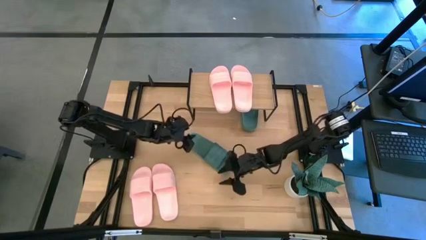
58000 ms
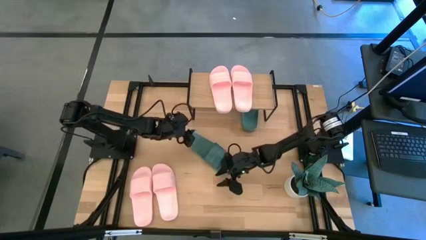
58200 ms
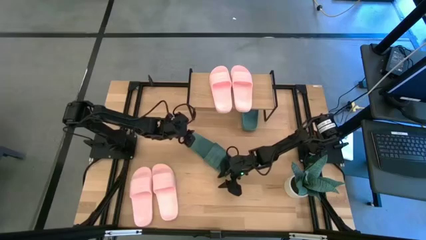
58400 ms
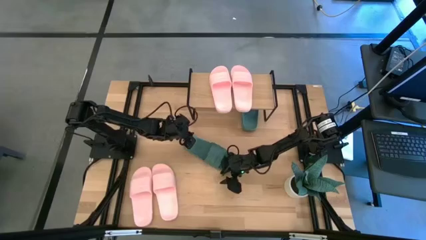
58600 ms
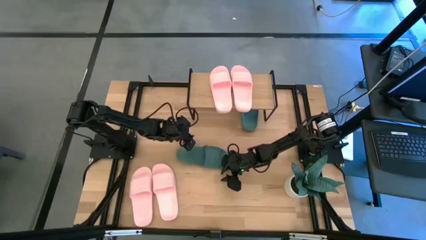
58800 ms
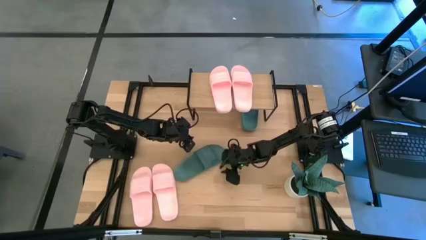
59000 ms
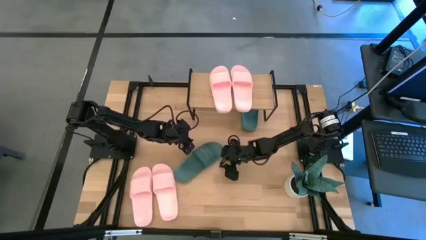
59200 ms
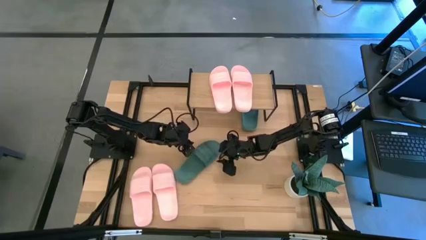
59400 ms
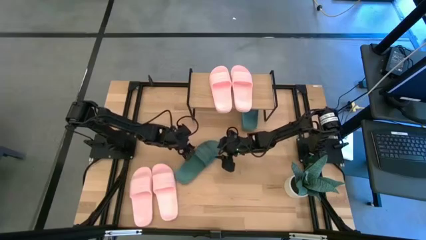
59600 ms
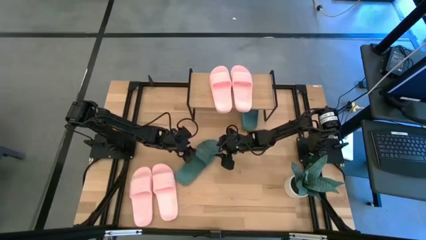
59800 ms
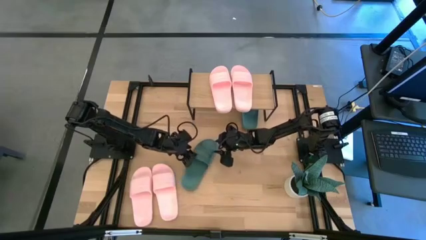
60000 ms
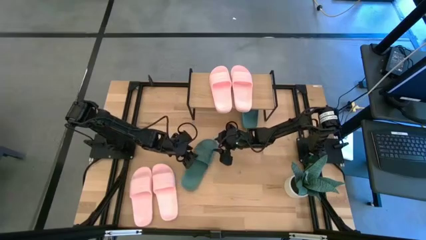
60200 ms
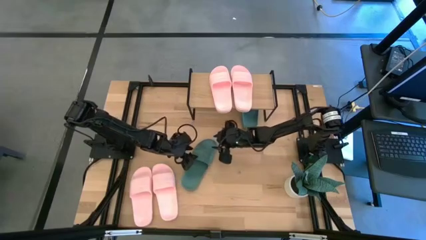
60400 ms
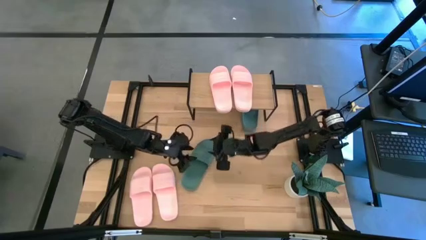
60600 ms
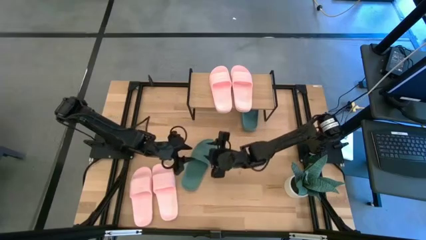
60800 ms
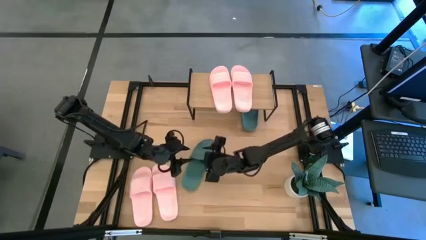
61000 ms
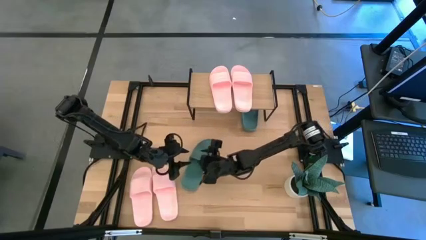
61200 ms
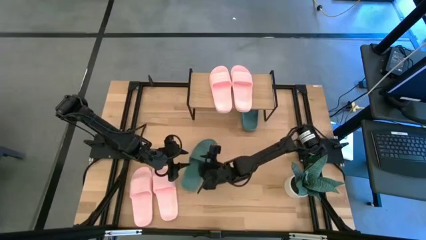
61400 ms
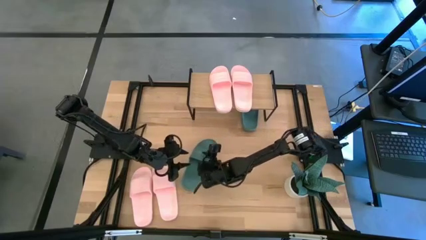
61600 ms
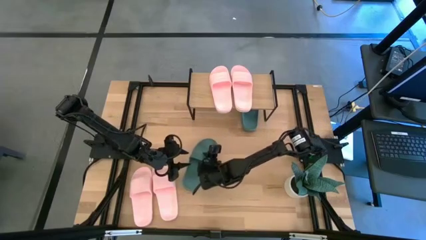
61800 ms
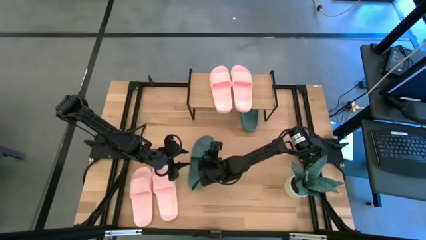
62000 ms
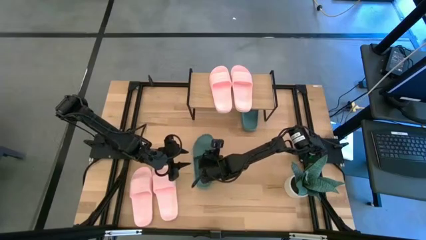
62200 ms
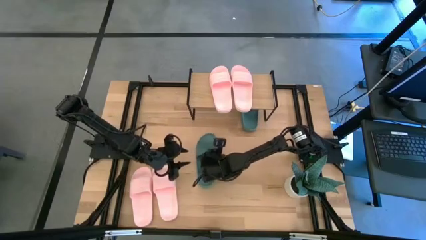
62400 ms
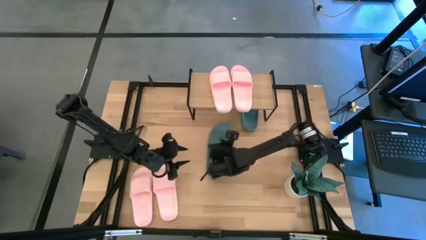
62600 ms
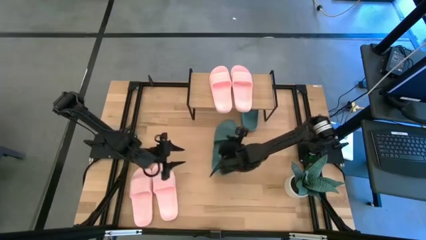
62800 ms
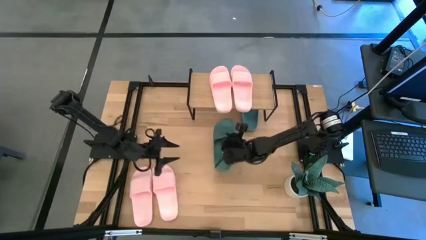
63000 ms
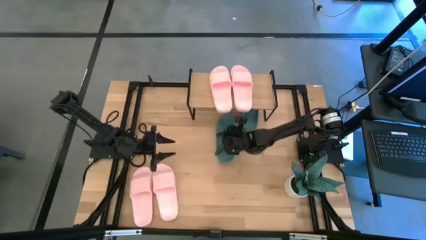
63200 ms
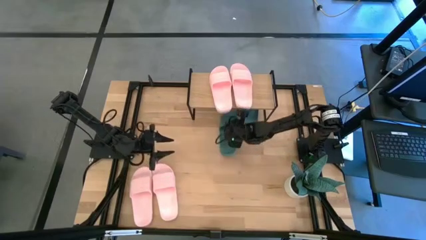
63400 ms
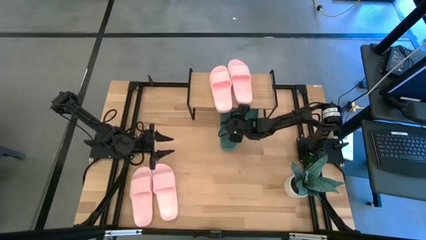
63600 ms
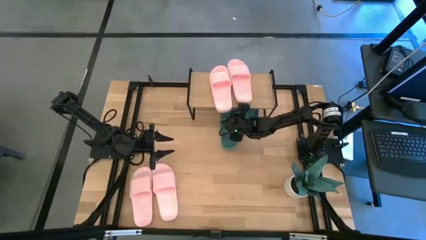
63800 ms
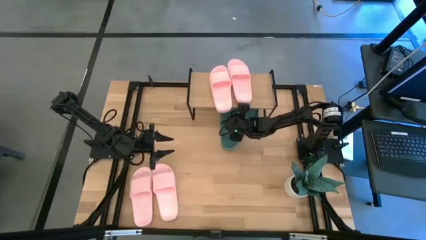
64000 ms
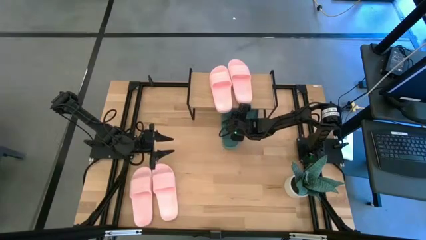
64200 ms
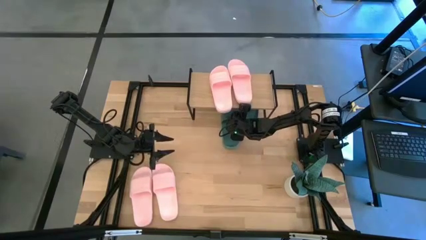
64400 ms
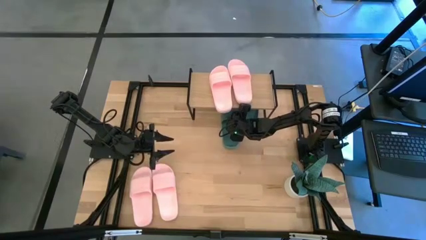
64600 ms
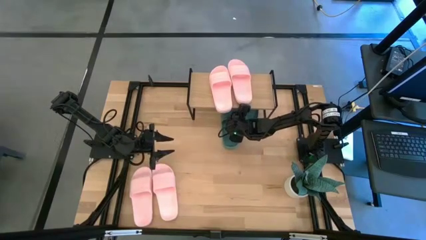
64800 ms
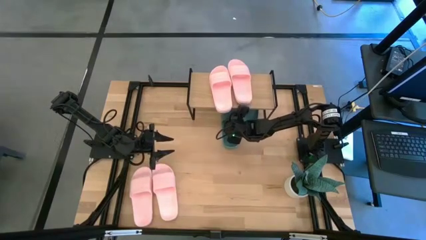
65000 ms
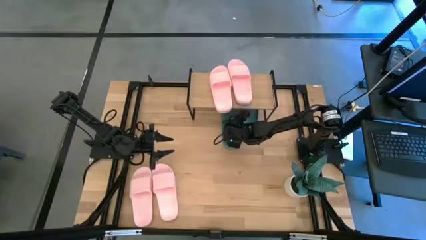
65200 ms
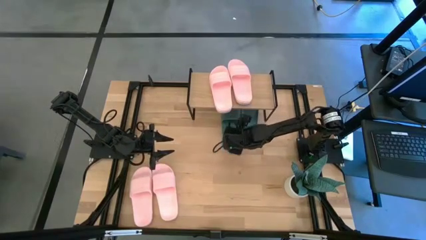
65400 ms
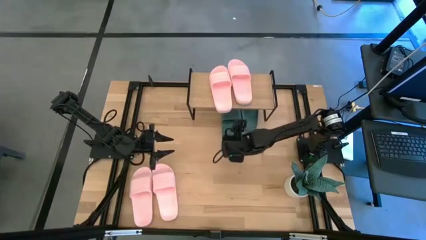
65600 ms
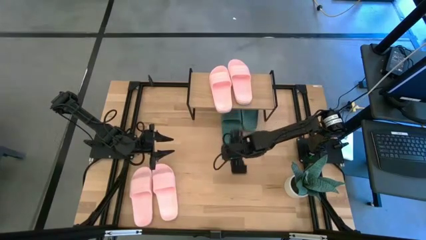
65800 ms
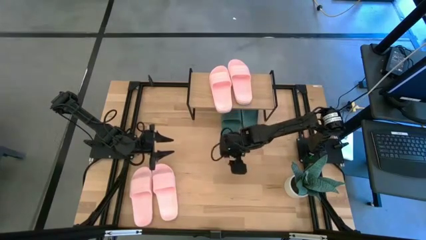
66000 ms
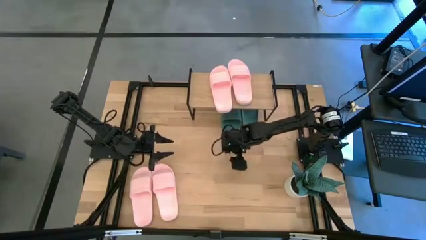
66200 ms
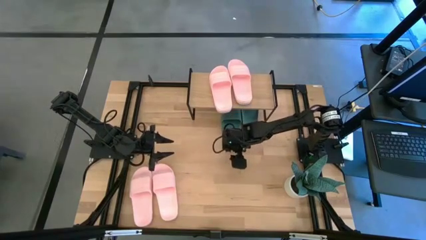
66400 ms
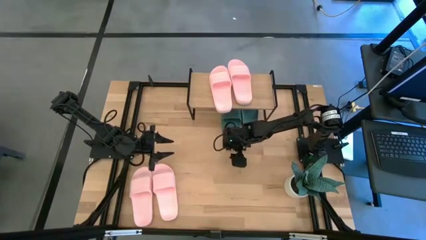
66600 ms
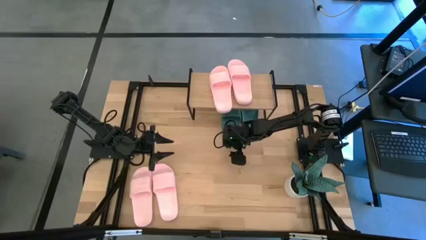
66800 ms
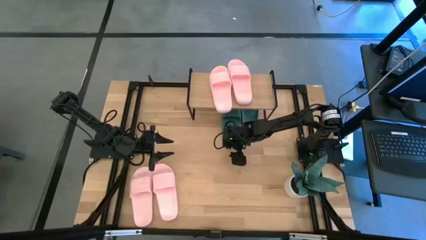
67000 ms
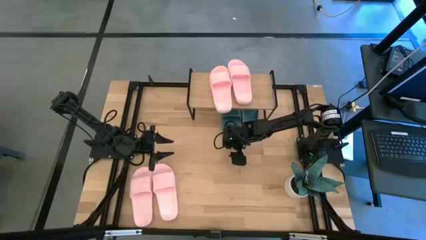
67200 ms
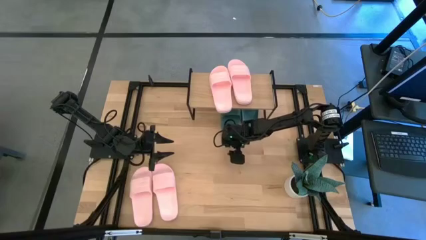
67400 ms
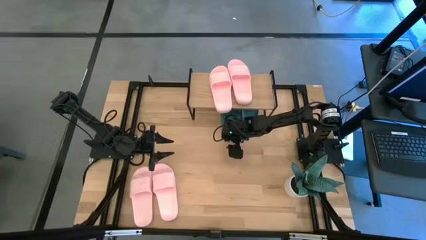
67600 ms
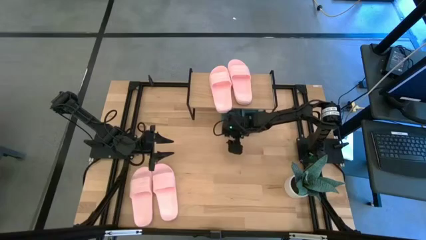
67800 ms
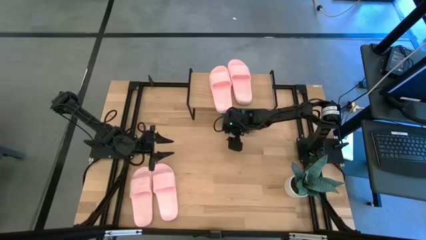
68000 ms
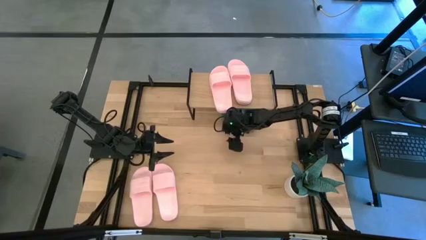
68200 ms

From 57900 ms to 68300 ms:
Task: Pick and place slides into the shelf
Put the green slipper under the shelf
